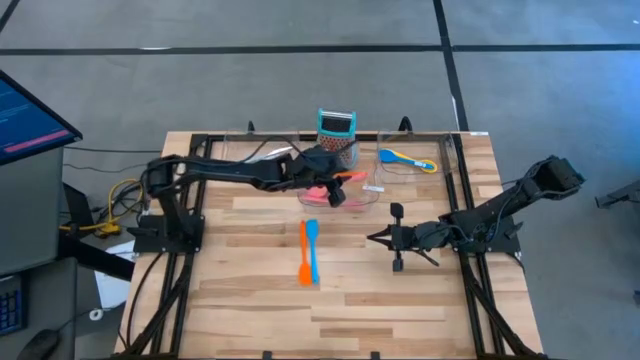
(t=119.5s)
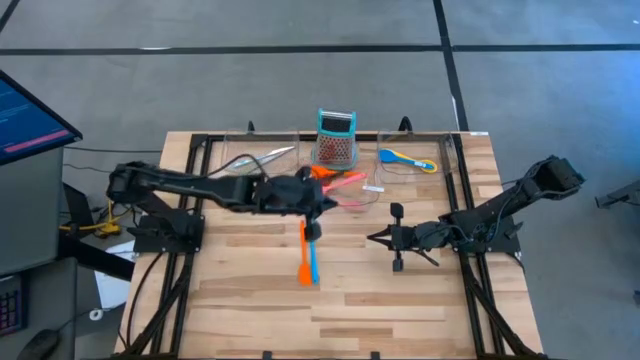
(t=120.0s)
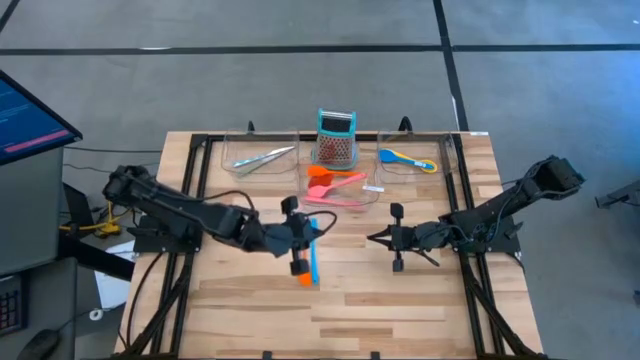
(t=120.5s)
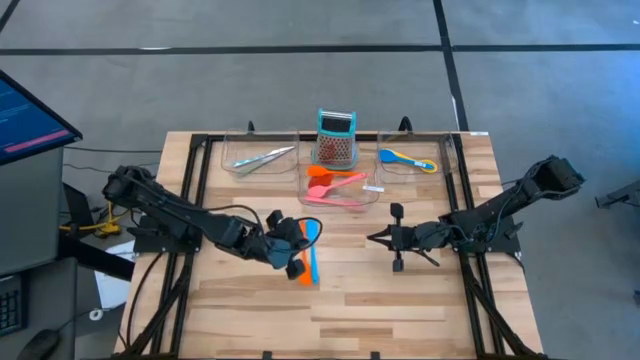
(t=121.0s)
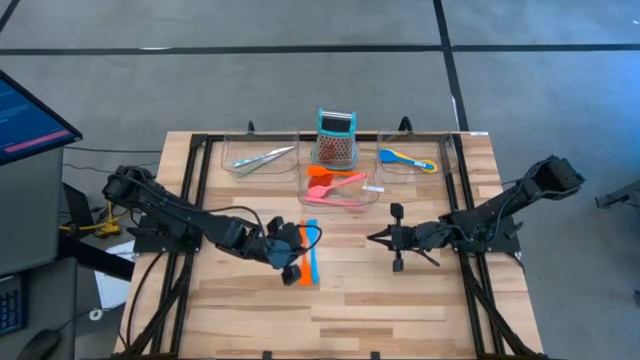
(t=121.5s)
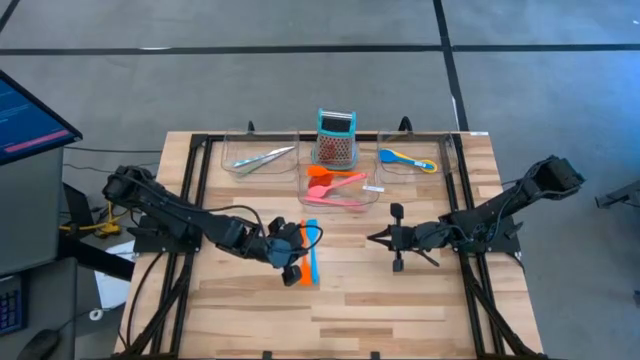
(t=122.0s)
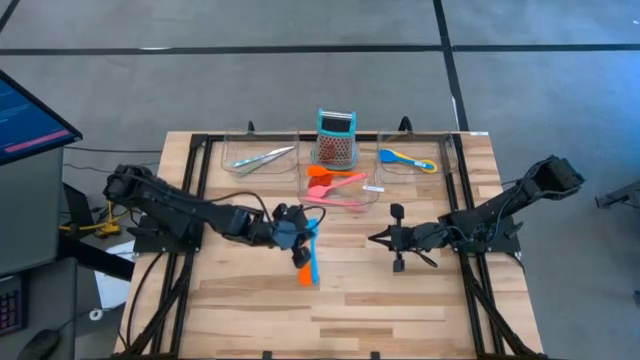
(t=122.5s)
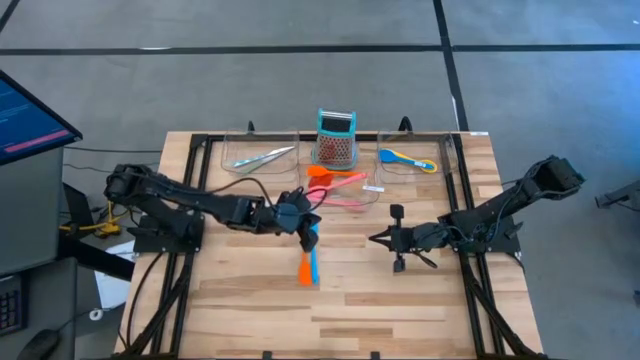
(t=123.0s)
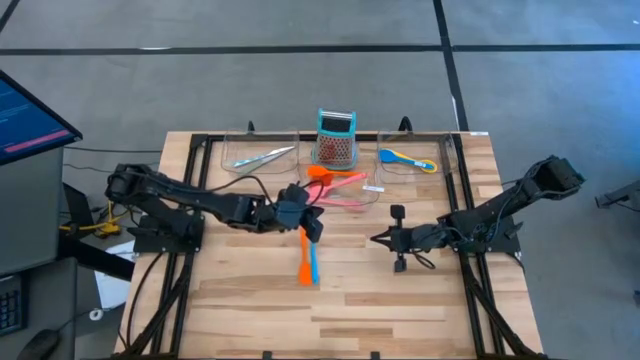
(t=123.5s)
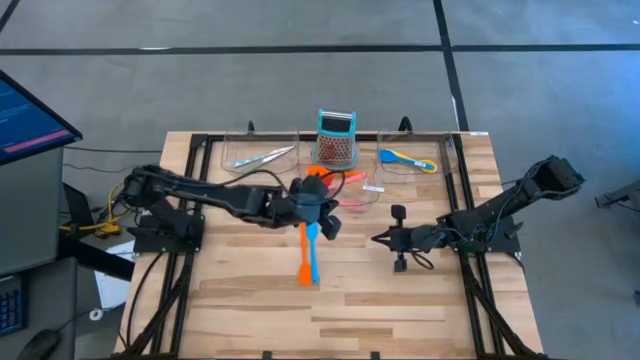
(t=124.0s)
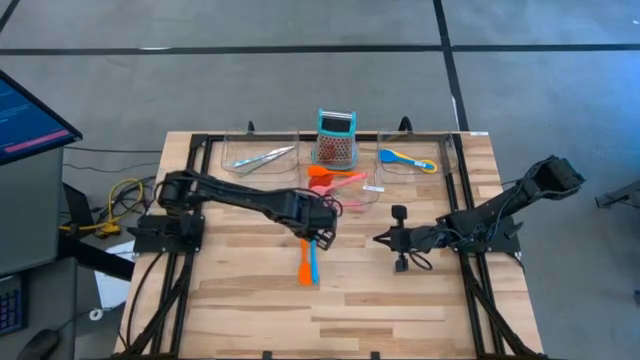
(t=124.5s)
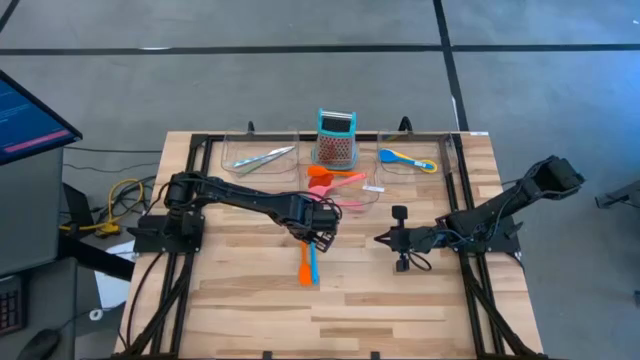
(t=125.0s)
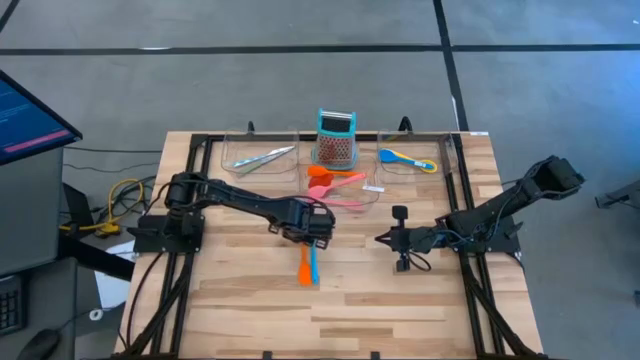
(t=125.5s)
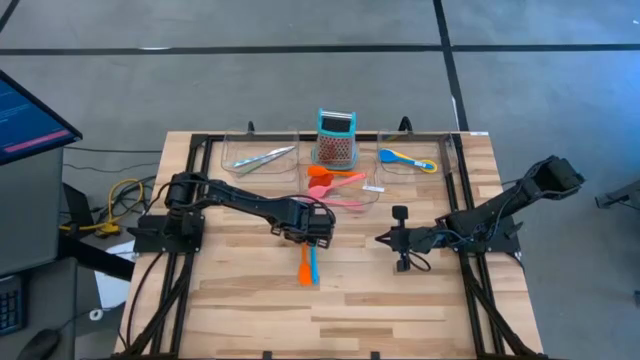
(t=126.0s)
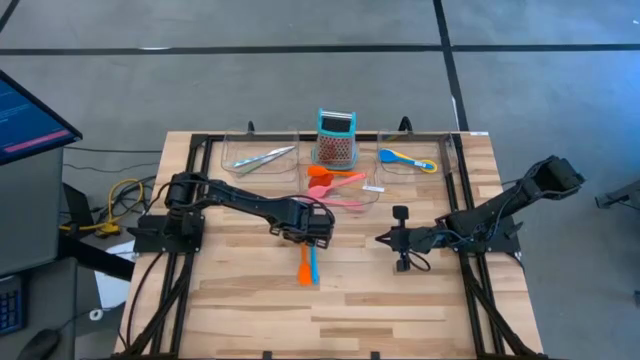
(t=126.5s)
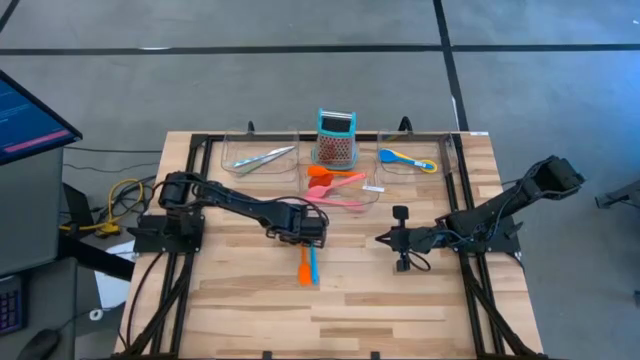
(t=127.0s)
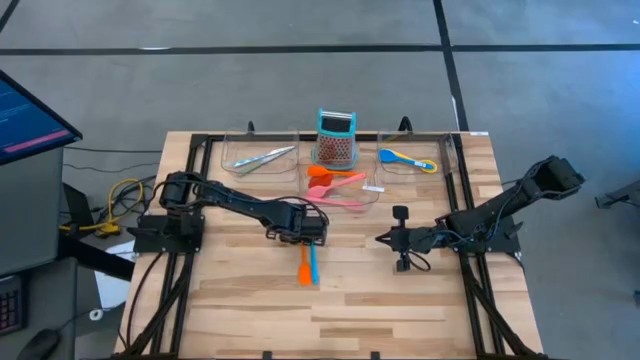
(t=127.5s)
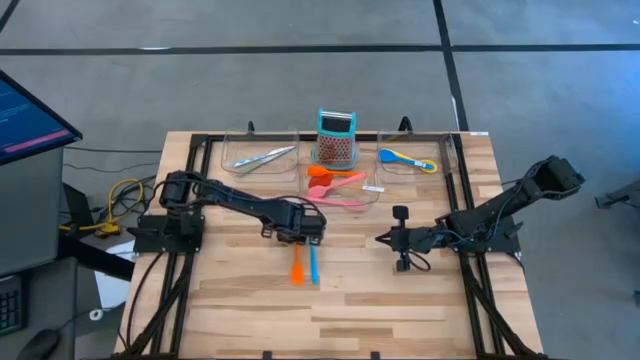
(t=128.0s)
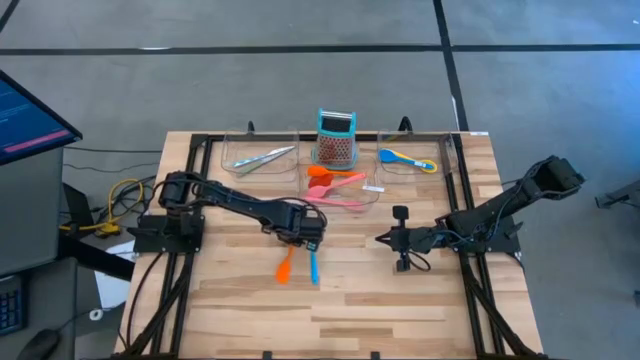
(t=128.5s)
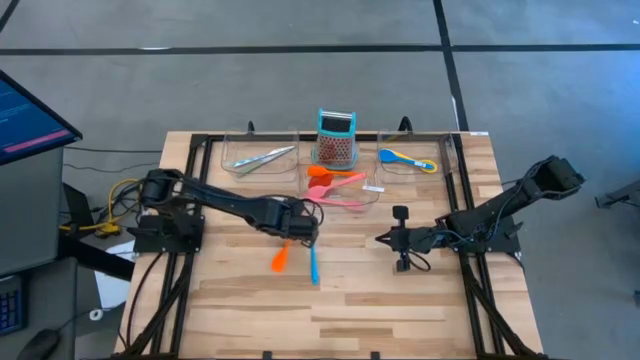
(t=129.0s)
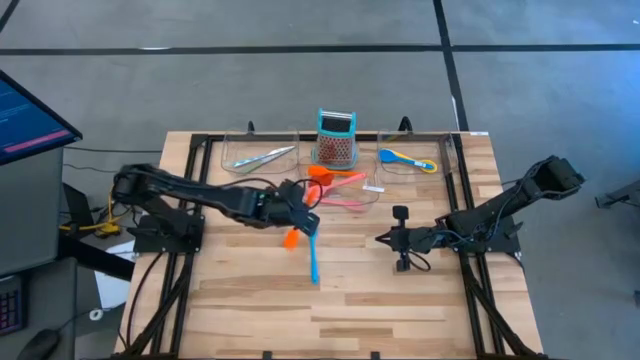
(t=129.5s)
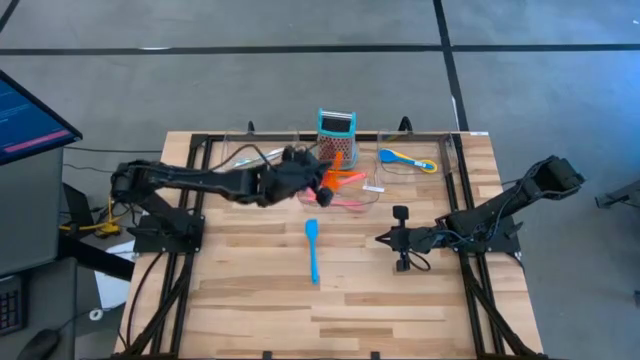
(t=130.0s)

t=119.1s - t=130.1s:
Task: Pick & Place Kitchen Items
Put the orange spatula into the middle transparent bin

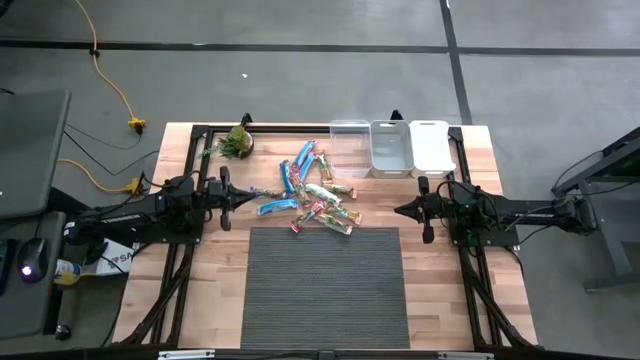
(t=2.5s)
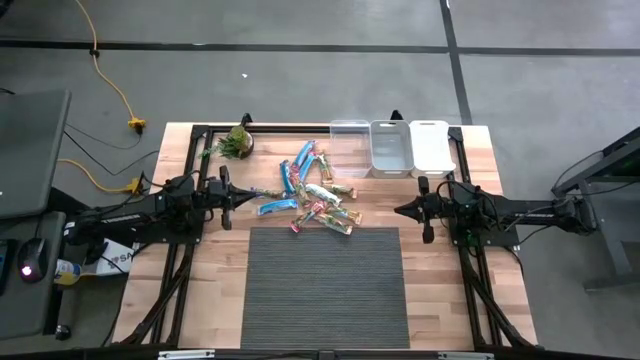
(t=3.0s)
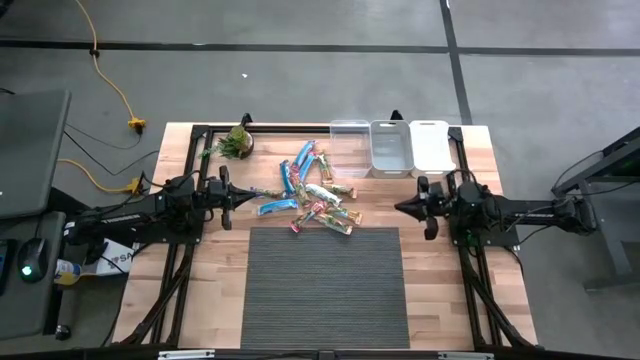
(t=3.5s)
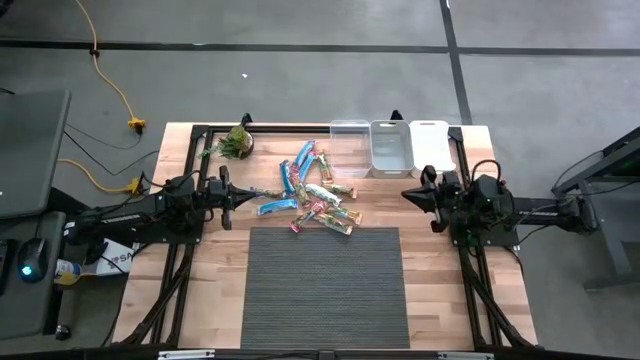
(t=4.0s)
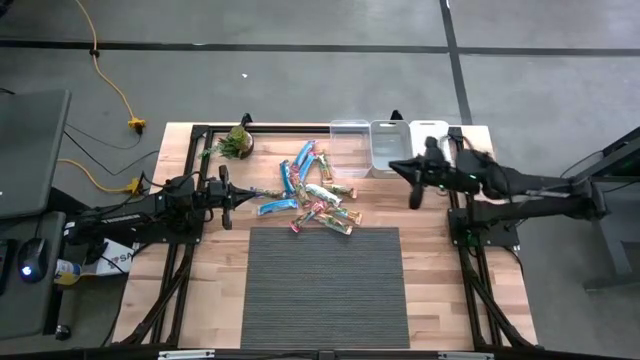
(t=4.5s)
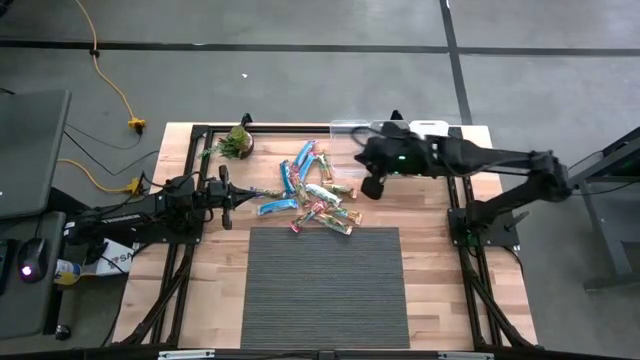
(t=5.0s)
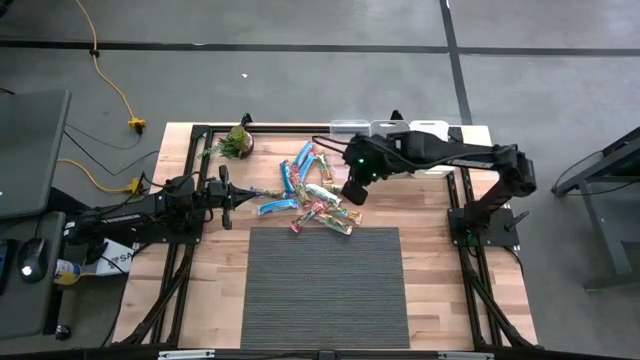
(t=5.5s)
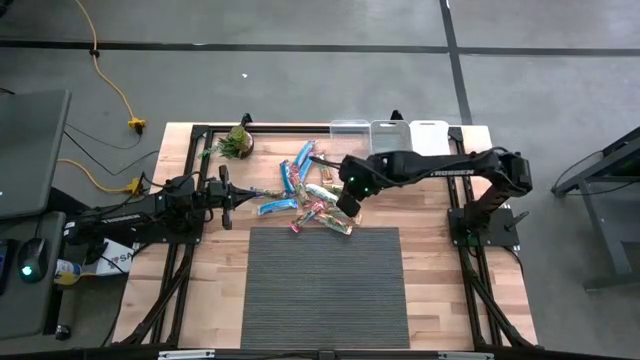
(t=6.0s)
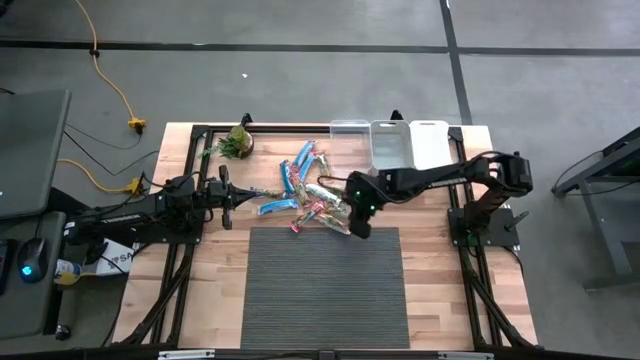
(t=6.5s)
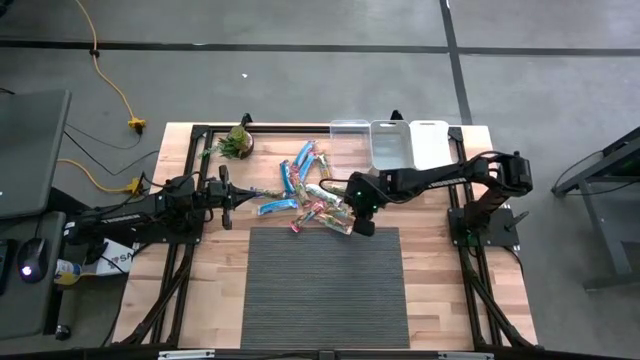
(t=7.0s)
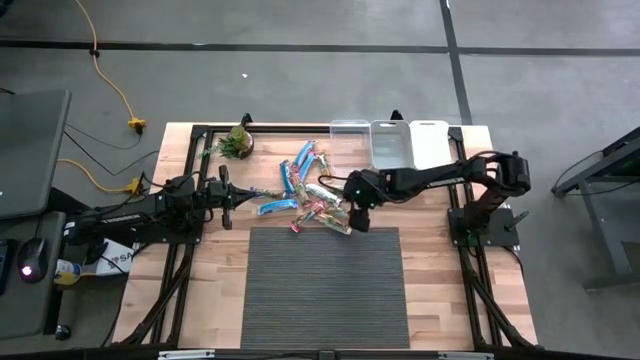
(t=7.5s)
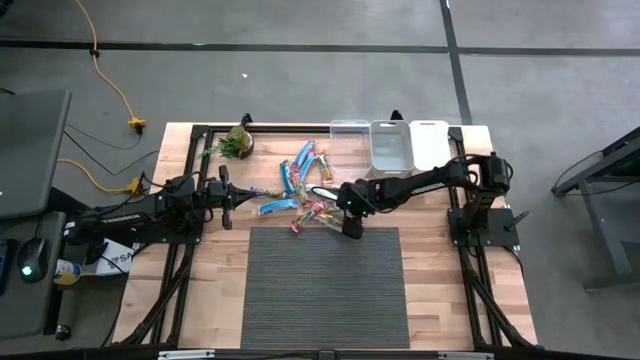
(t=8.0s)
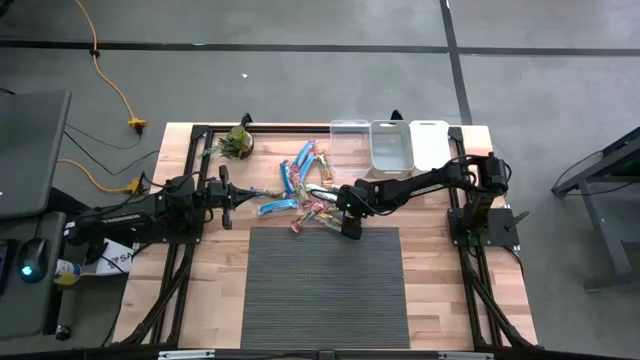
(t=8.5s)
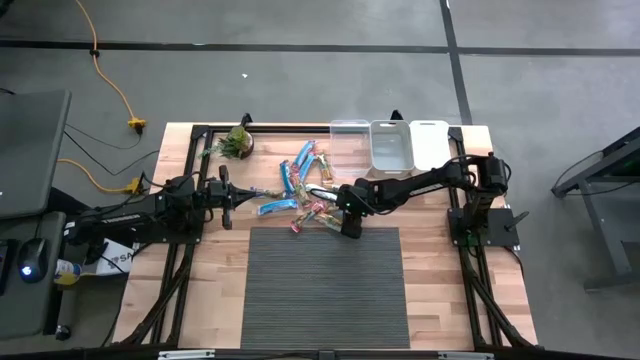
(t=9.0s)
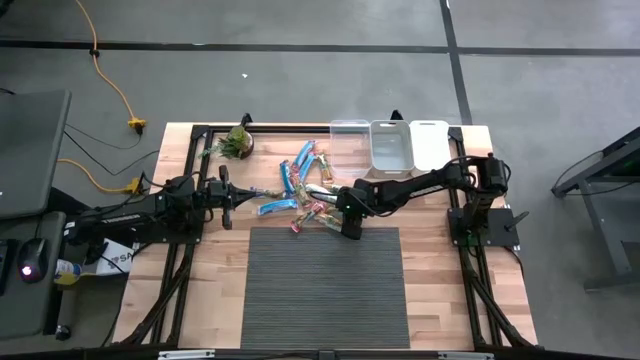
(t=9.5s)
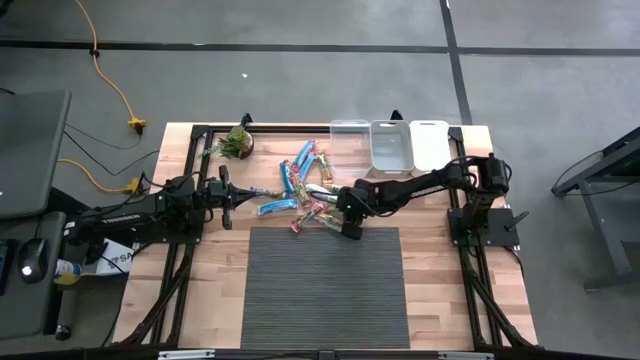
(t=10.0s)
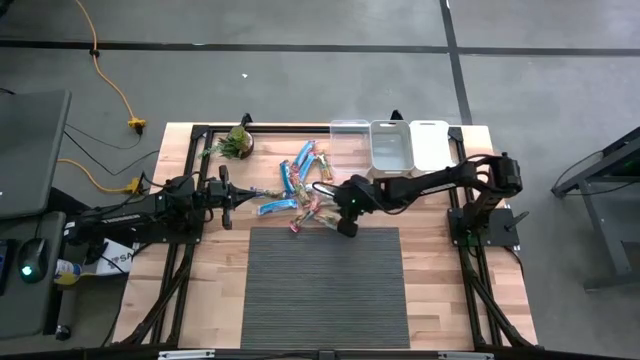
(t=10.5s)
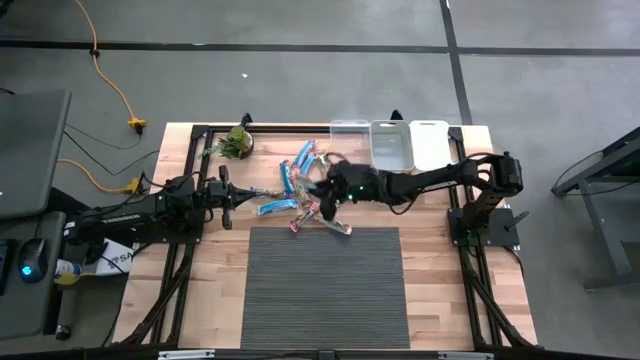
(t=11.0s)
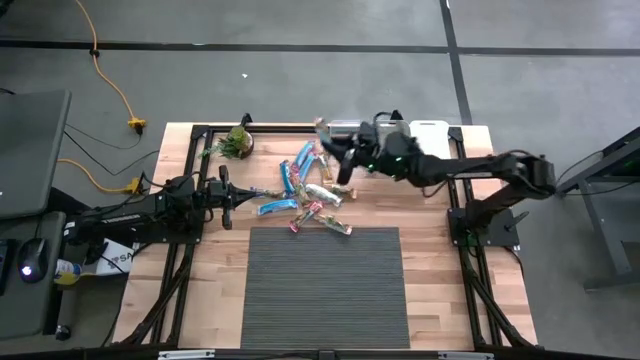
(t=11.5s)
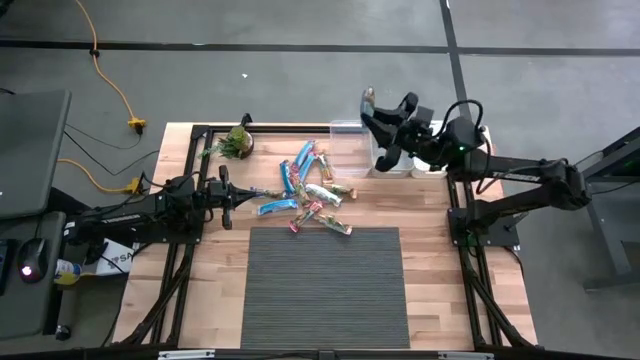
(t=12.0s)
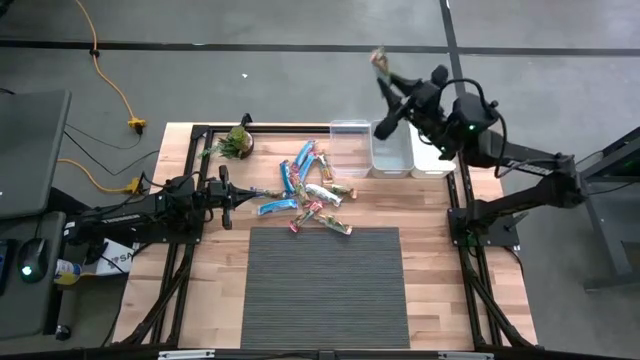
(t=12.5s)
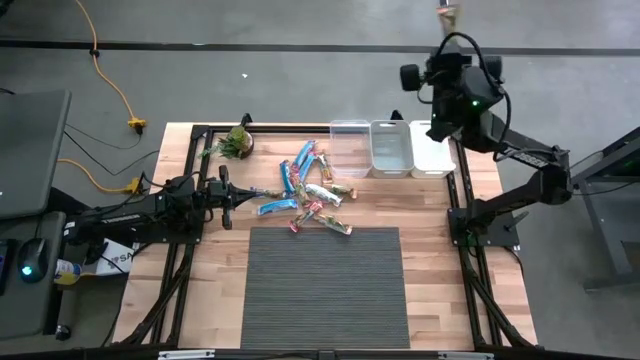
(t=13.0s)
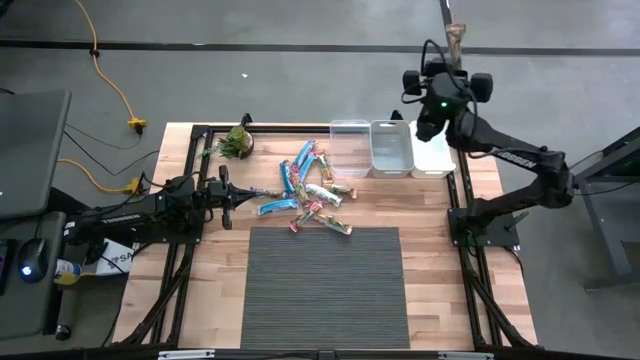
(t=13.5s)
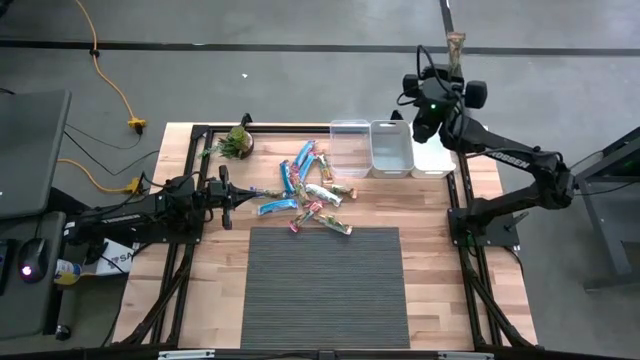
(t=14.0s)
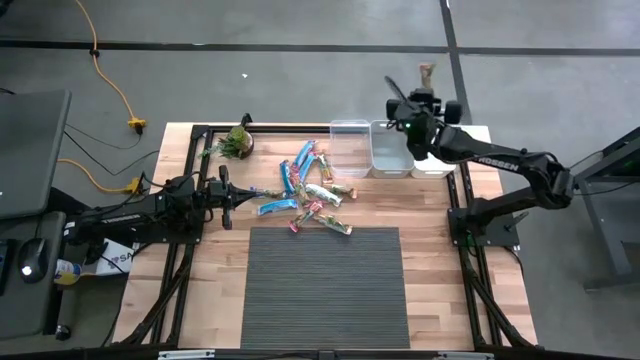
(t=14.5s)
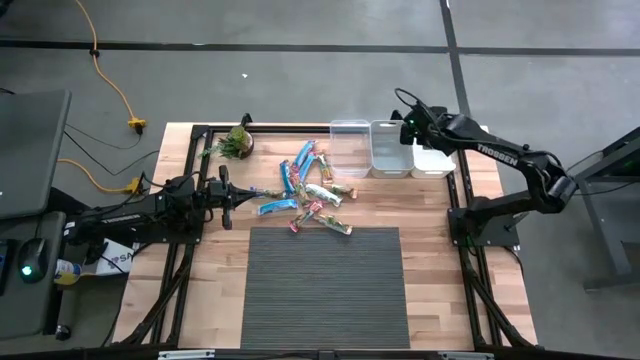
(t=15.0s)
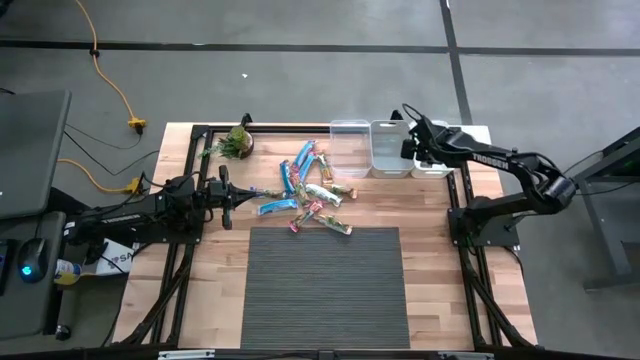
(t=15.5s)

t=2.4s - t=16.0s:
Task: Pick and place Granola Bars by type
Put the yellow granola bar into the white bin
